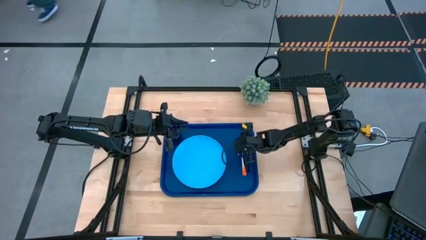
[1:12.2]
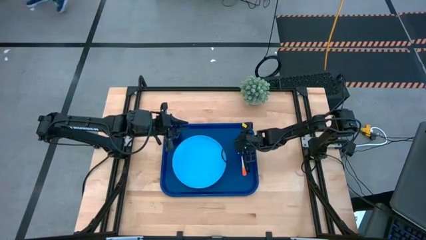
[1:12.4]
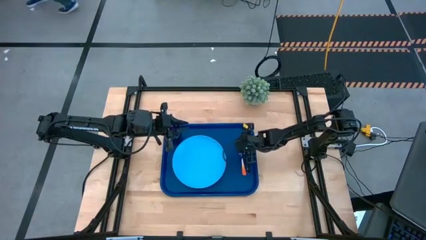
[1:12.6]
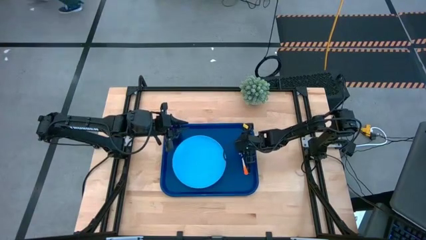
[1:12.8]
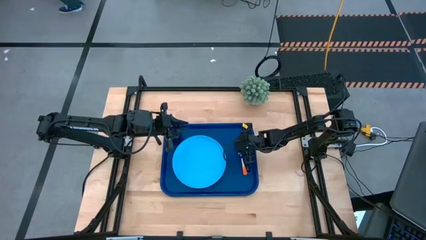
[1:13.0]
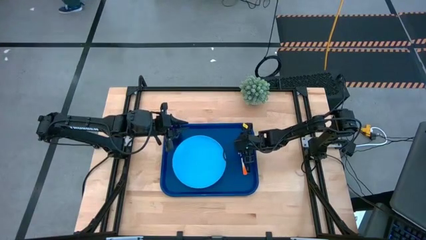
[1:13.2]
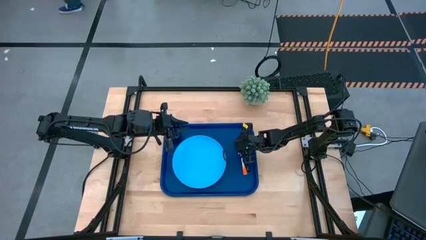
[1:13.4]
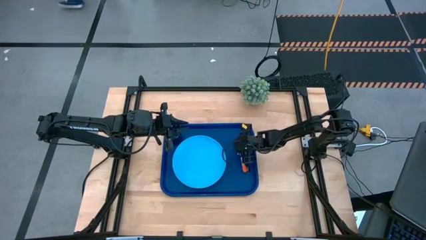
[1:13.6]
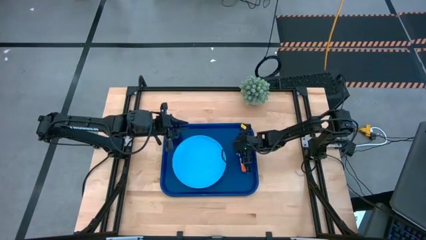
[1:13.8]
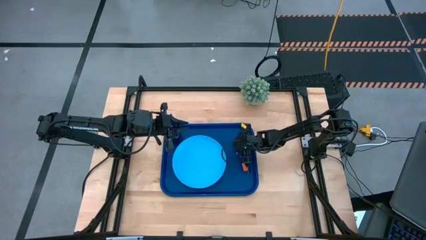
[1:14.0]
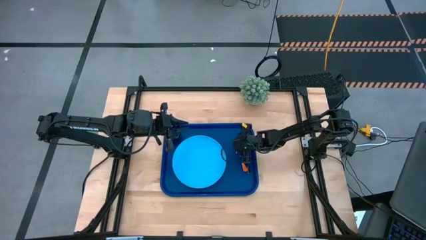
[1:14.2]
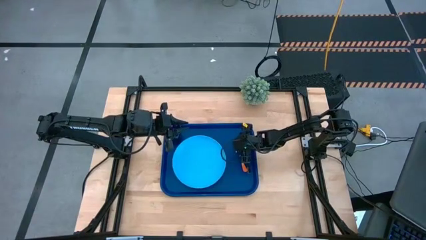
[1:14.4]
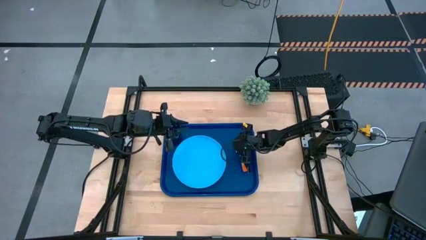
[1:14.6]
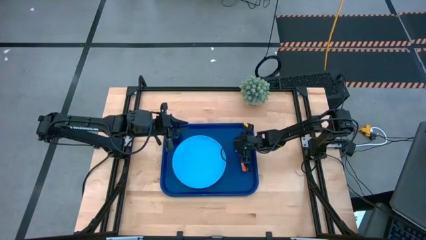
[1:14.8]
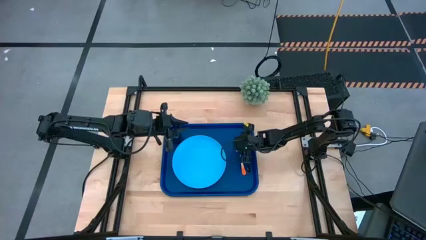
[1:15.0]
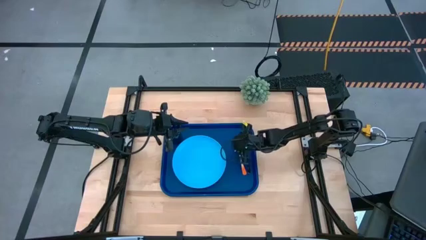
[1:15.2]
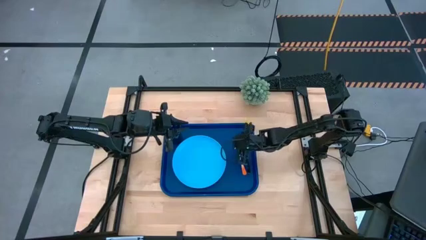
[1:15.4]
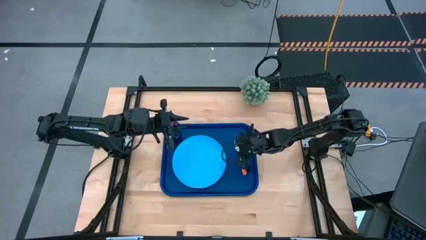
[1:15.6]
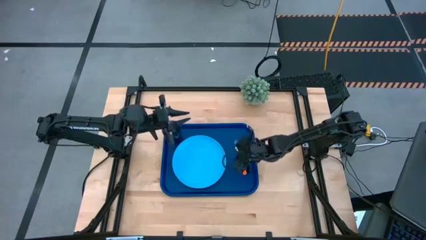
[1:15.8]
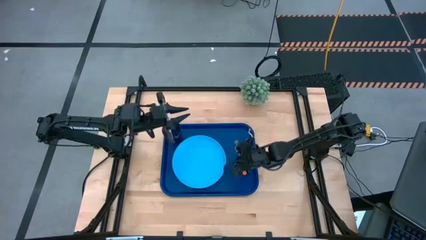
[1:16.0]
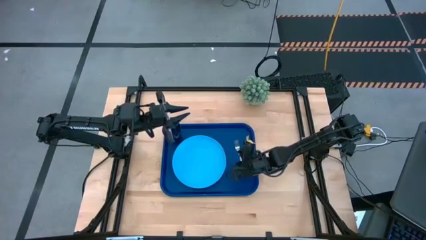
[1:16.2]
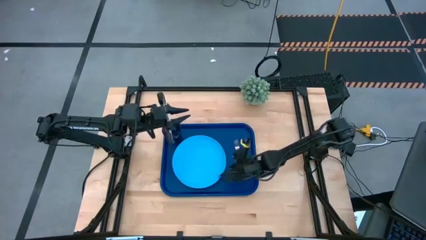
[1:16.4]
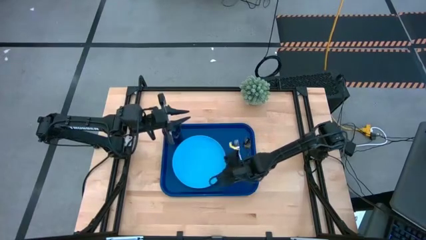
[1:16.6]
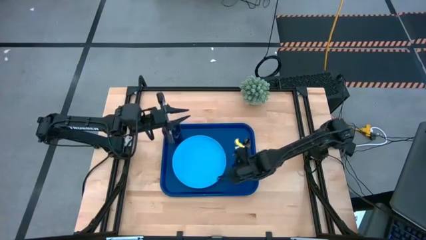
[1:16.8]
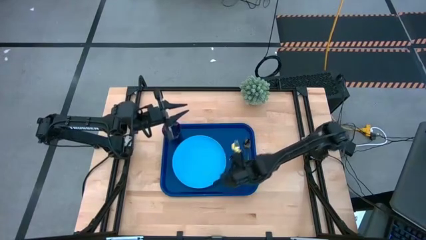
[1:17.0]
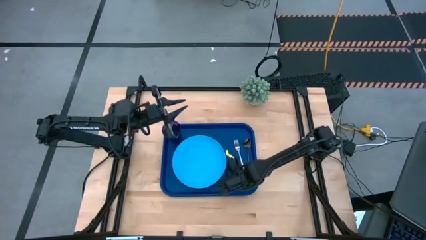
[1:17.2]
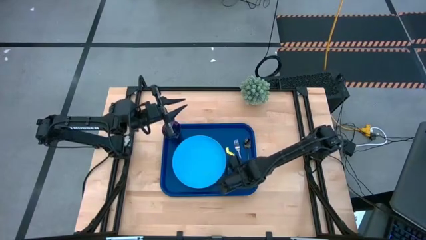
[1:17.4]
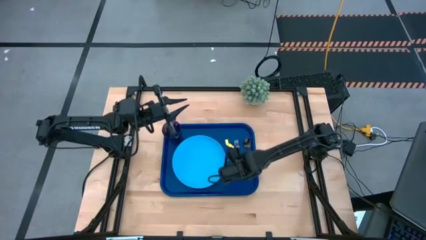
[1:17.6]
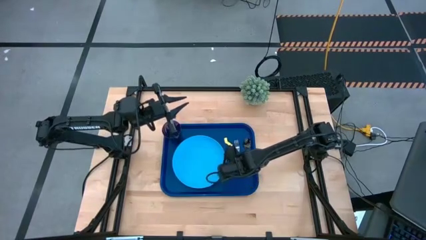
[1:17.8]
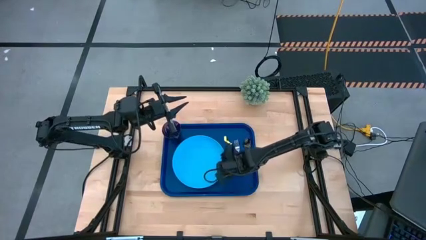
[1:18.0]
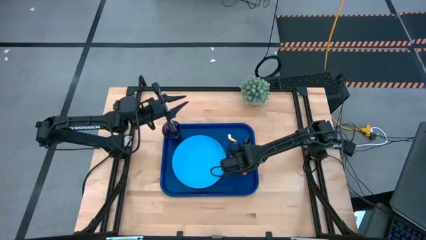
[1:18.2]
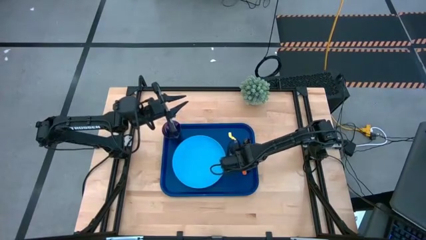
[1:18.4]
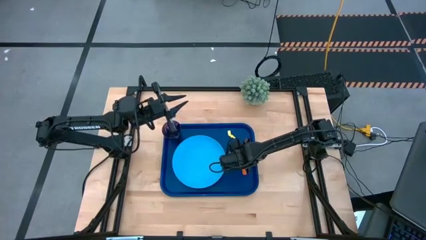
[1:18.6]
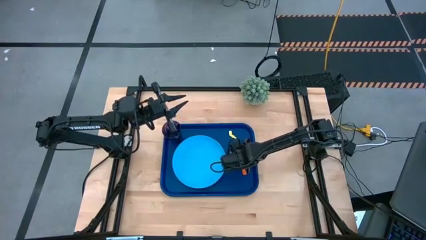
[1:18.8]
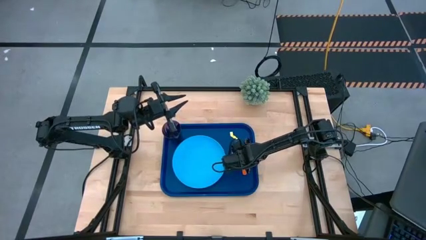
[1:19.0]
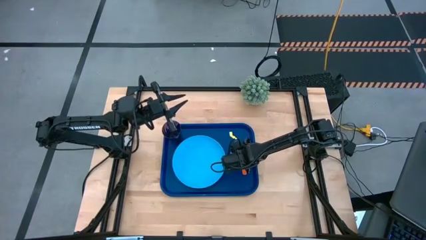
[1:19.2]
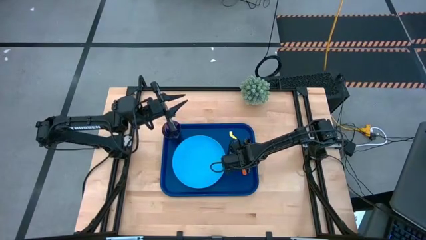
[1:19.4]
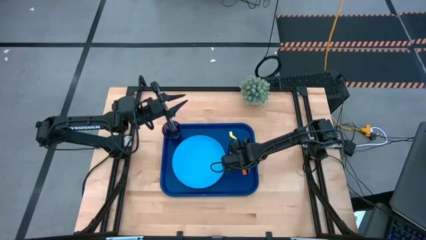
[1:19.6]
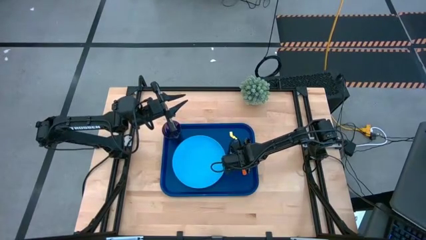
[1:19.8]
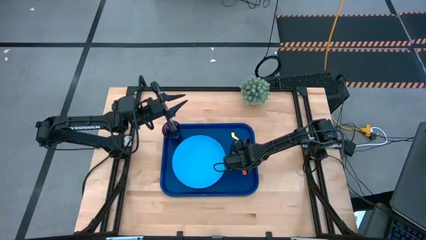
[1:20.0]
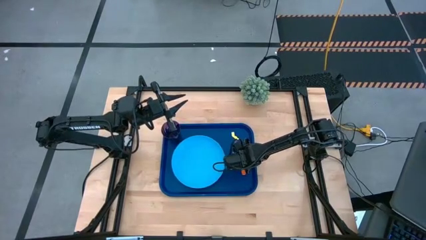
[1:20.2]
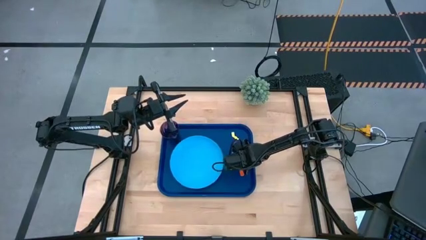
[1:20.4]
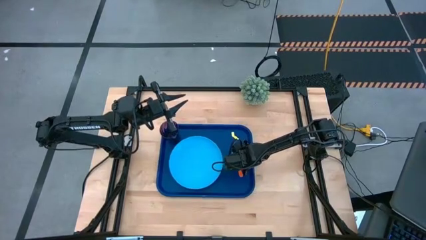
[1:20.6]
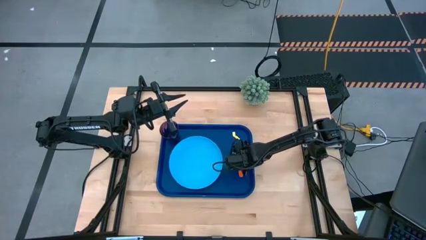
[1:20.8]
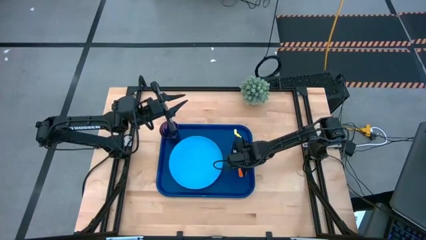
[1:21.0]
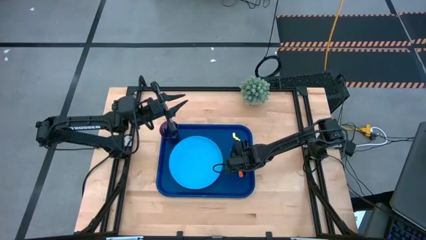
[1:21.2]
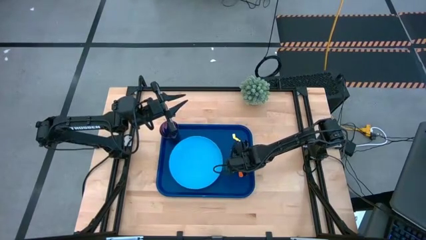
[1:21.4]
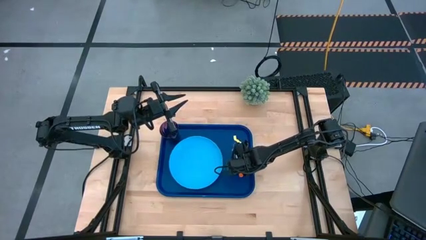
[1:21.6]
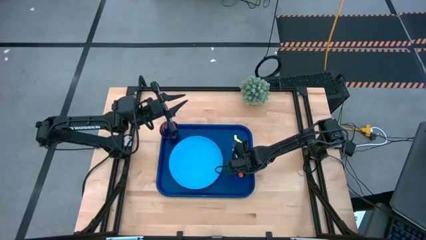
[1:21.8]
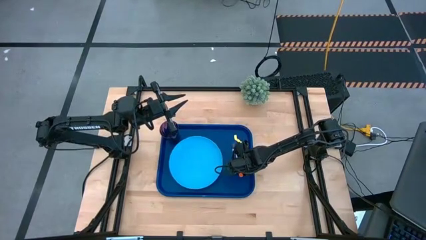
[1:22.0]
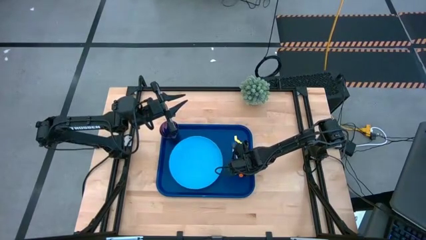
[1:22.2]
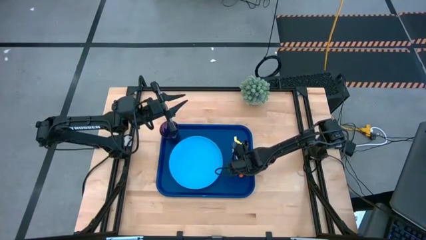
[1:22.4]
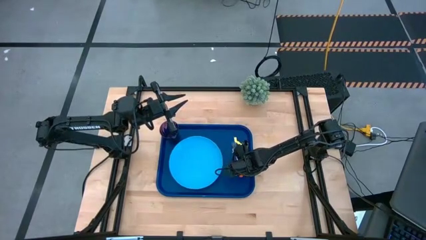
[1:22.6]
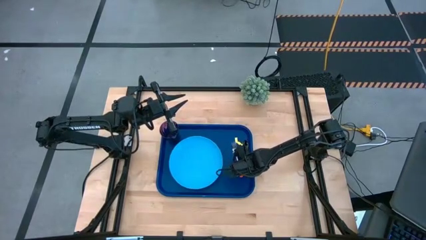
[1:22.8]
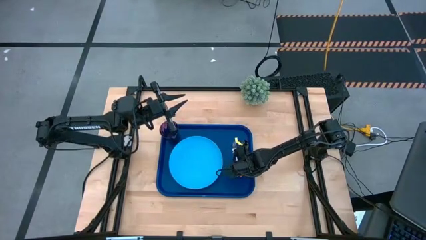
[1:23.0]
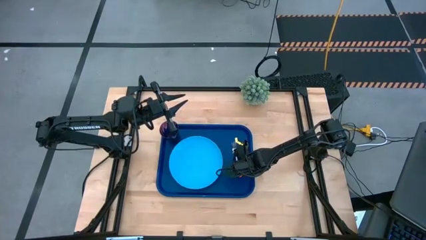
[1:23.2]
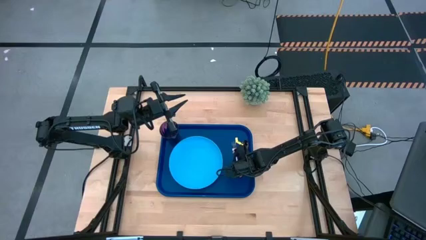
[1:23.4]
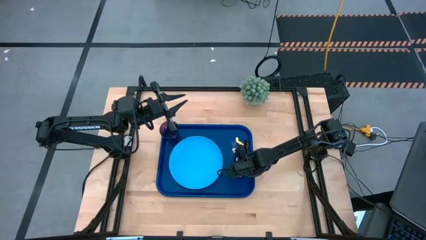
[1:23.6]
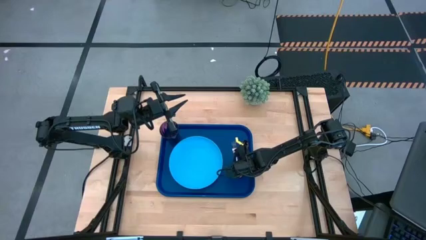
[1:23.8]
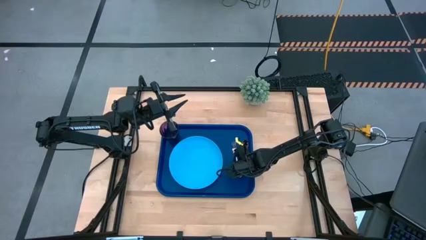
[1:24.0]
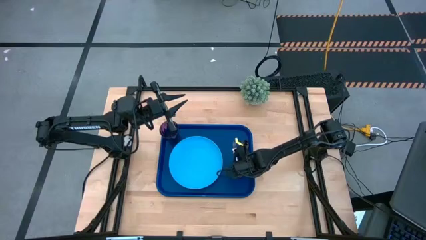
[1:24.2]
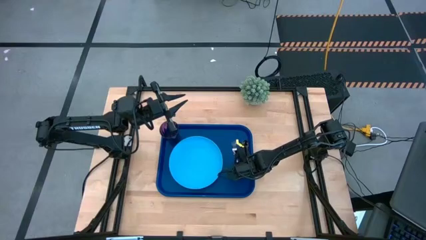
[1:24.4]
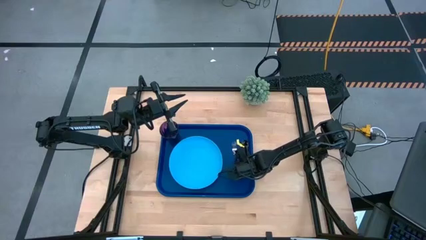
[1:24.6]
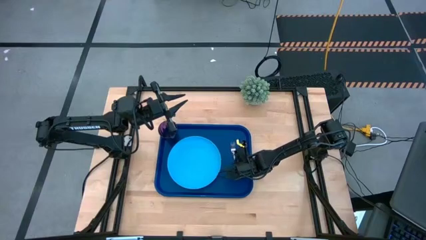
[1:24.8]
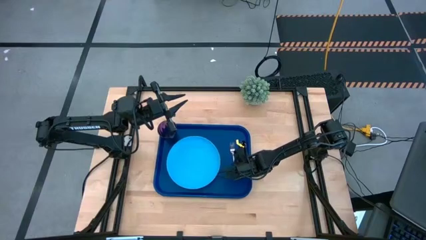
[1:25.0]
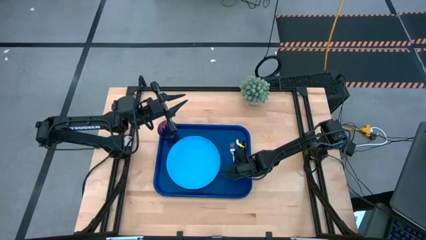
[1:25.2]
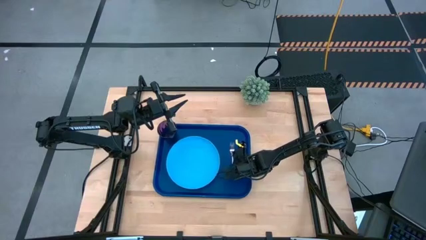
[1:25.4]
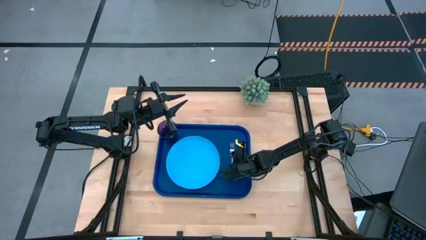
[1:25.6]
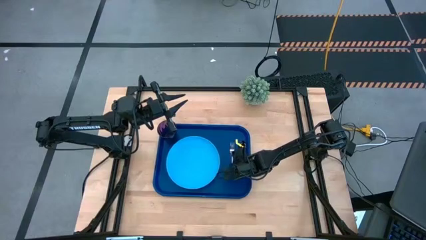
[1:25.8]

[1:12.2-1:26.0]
Task: Pick and place plate/cup/fork/spoon on tray
Put the orange fork in the middle of the light blue plate and black spoon on the dark blue tray

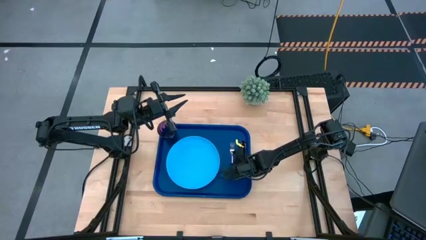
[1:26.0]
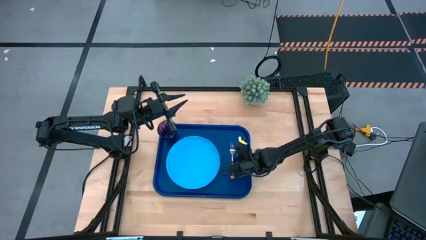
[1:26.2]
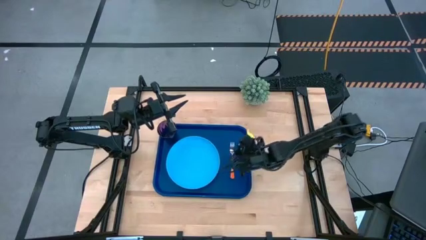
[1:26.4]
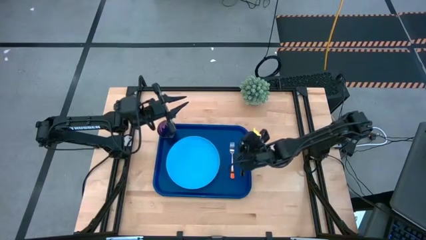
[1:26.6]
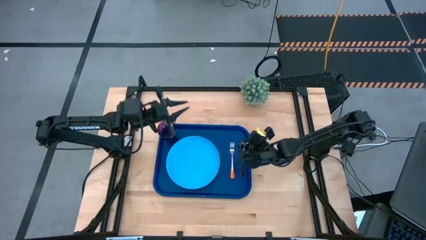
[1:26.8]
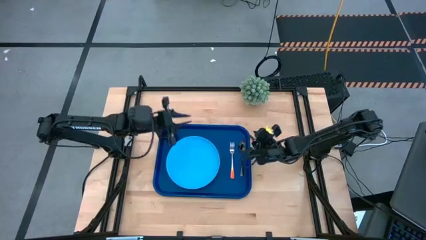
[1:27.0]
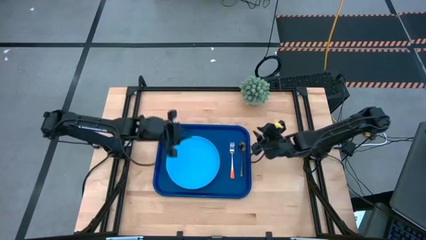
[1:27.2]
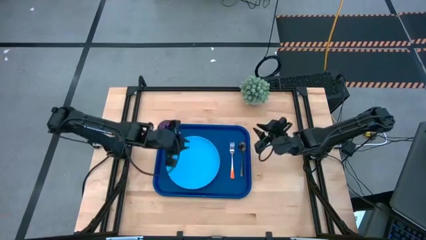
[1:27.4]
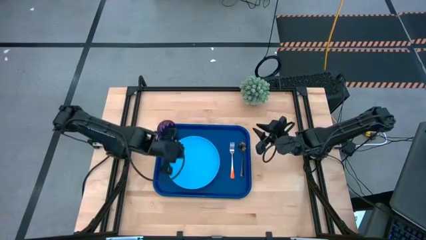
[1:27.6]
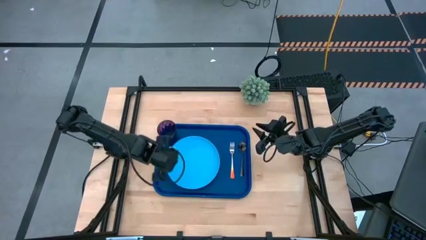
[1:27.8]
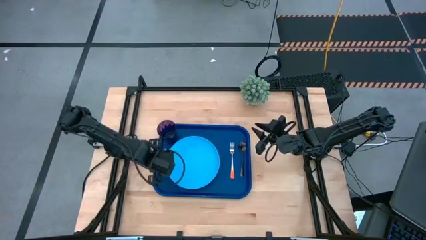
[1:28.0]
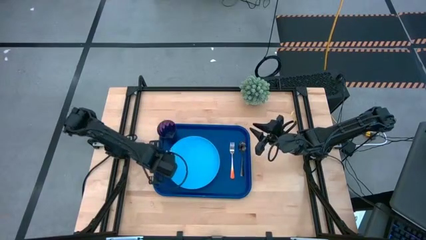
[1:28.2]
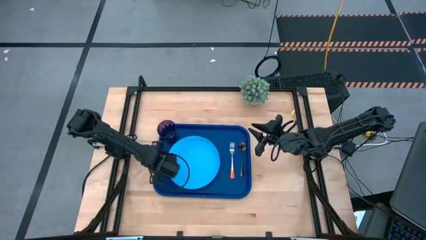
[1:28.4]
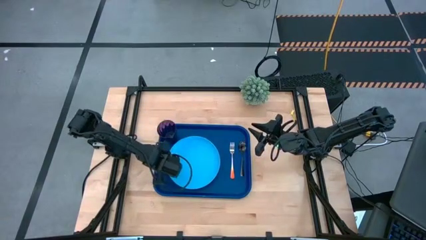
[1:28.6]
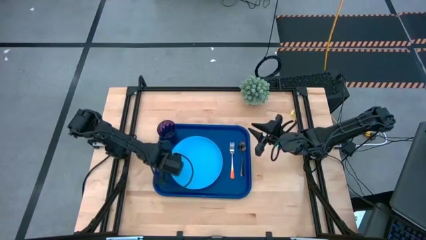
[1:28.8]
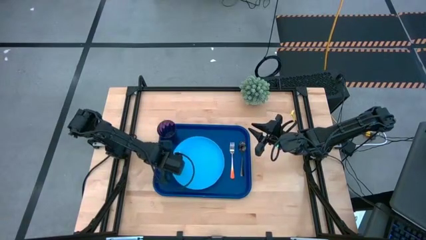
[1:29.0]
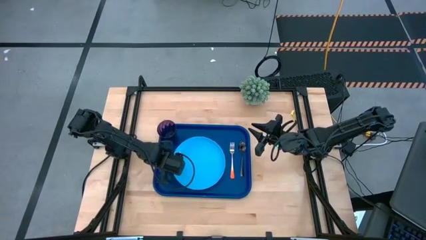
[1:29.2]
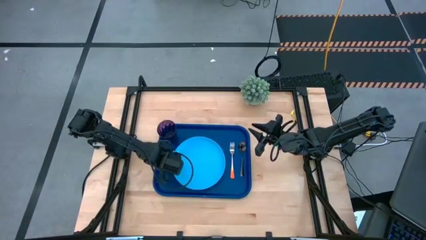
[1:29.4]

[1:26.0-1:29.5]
Adjust the light blue plate on the dark blue tray
